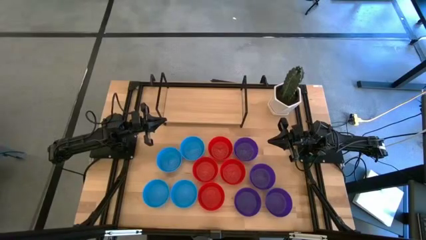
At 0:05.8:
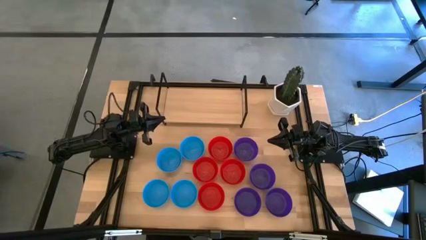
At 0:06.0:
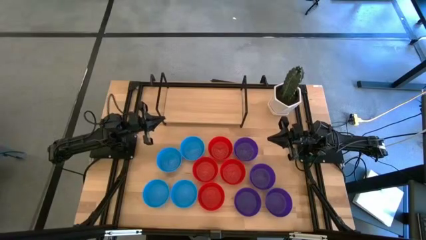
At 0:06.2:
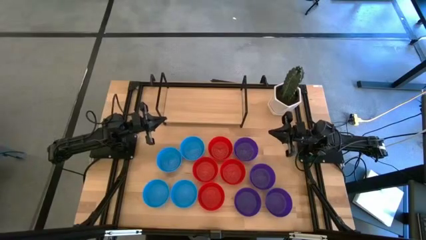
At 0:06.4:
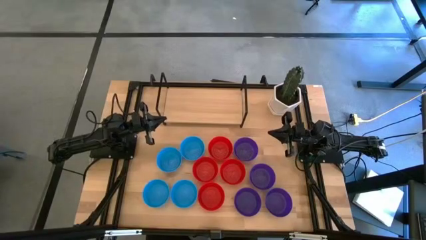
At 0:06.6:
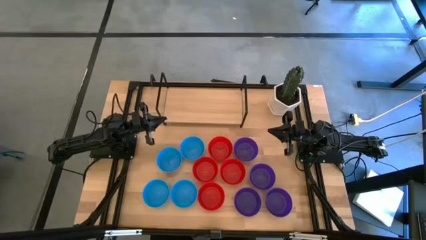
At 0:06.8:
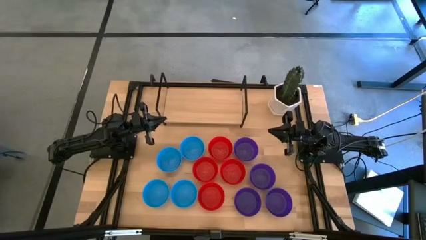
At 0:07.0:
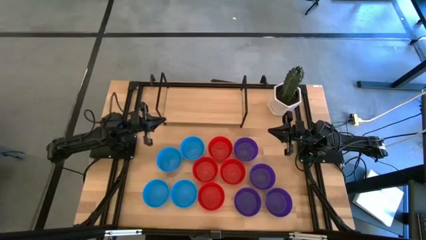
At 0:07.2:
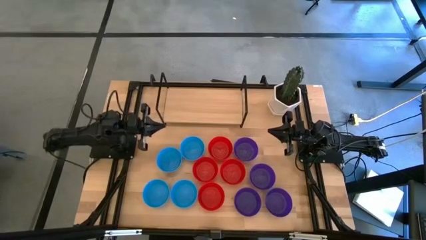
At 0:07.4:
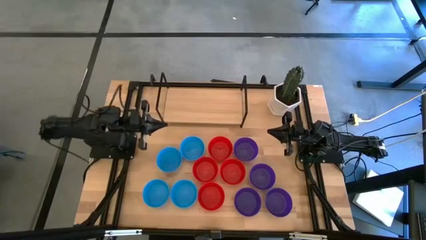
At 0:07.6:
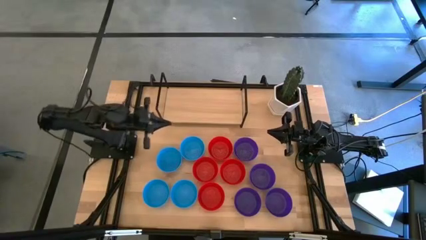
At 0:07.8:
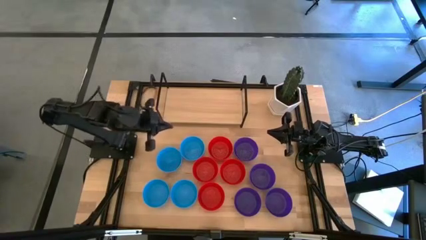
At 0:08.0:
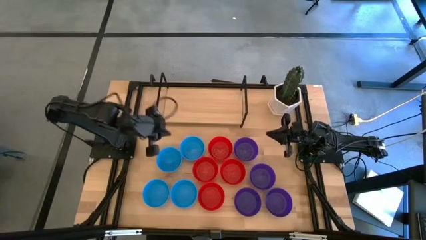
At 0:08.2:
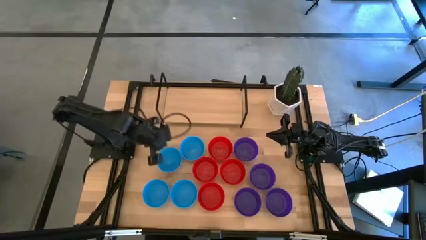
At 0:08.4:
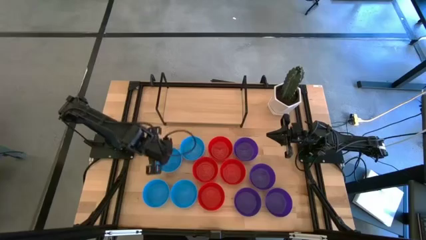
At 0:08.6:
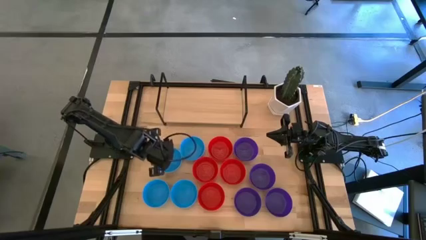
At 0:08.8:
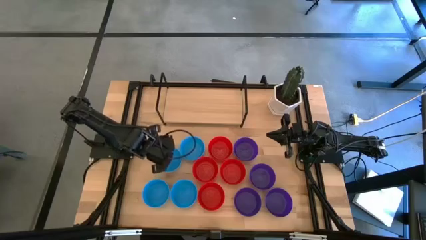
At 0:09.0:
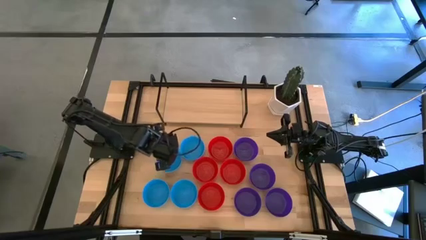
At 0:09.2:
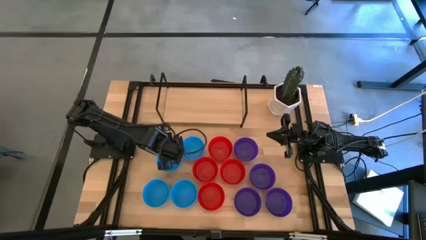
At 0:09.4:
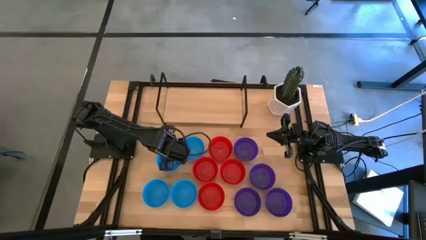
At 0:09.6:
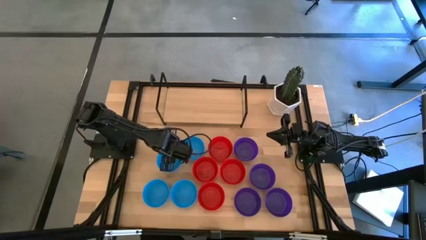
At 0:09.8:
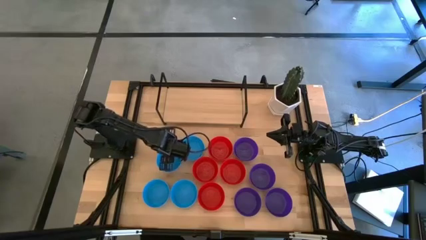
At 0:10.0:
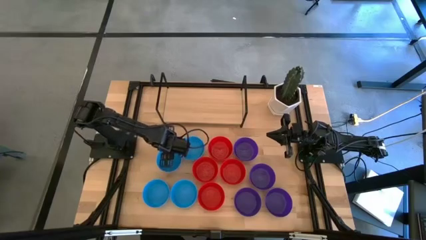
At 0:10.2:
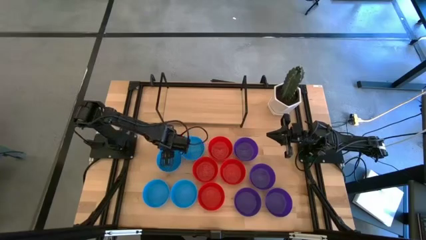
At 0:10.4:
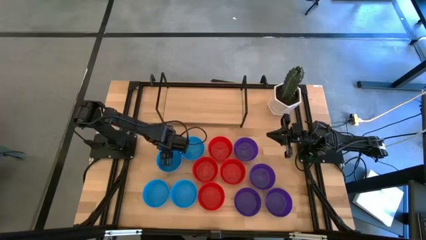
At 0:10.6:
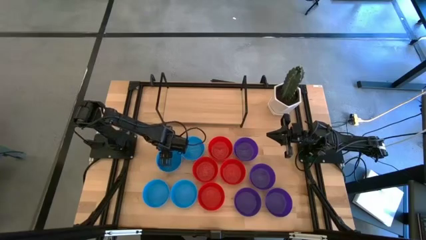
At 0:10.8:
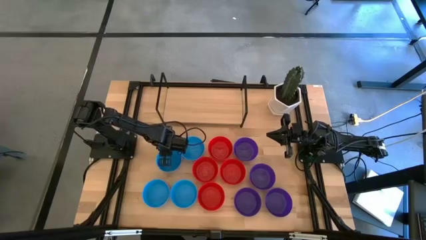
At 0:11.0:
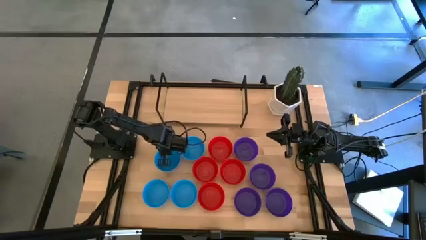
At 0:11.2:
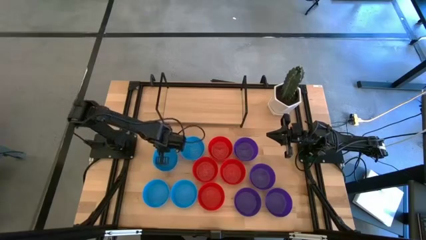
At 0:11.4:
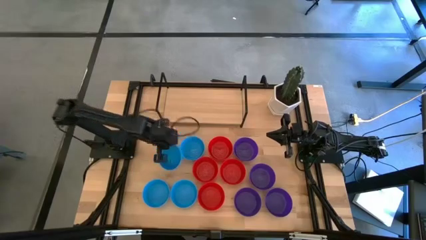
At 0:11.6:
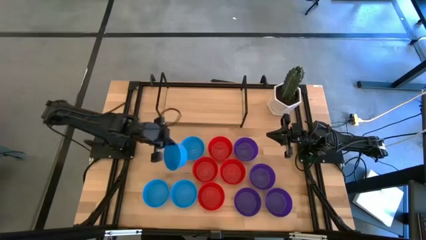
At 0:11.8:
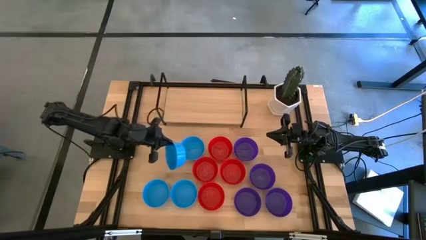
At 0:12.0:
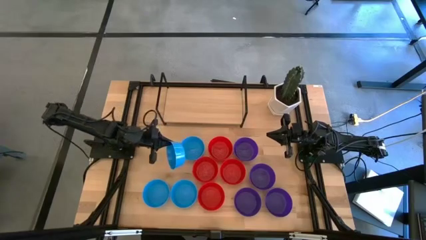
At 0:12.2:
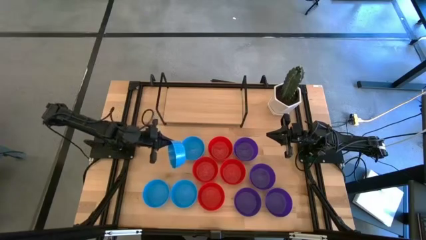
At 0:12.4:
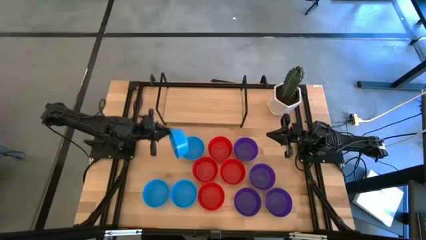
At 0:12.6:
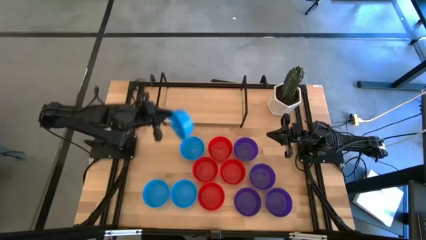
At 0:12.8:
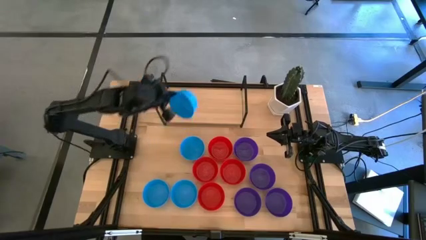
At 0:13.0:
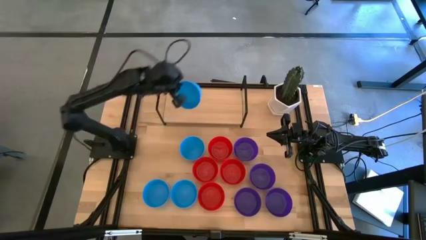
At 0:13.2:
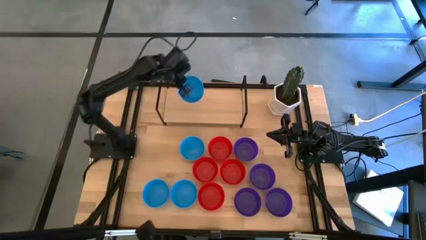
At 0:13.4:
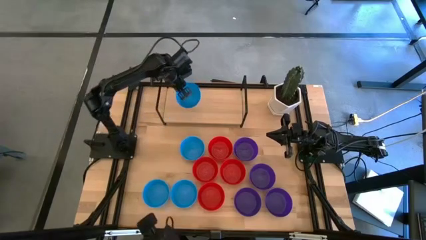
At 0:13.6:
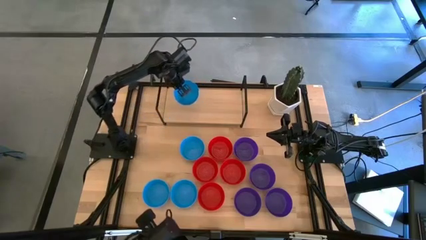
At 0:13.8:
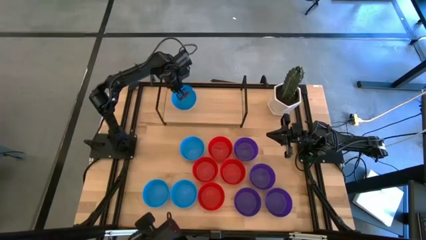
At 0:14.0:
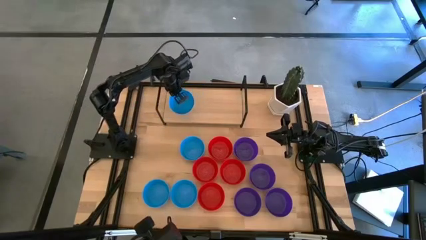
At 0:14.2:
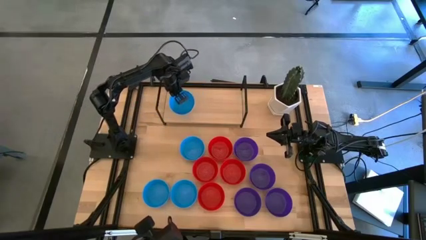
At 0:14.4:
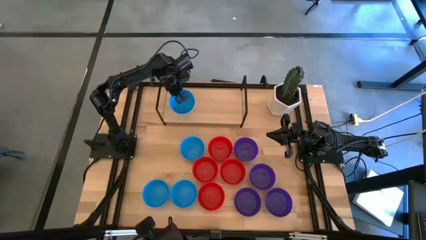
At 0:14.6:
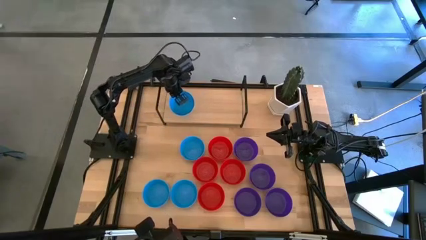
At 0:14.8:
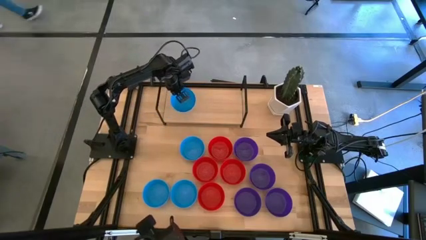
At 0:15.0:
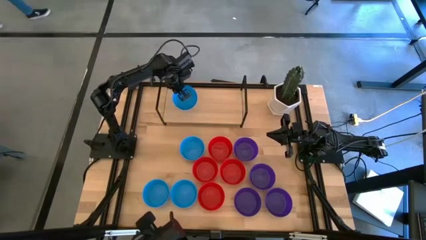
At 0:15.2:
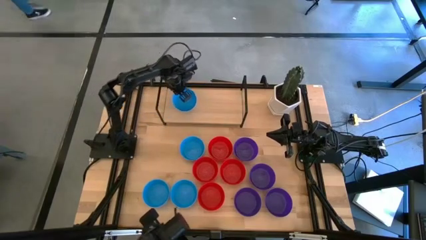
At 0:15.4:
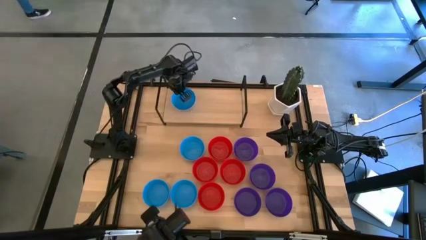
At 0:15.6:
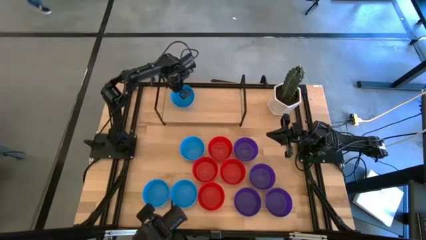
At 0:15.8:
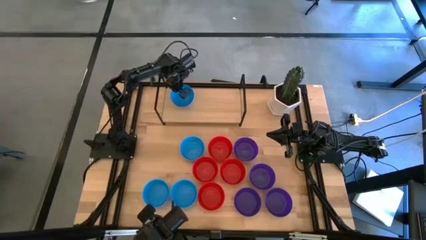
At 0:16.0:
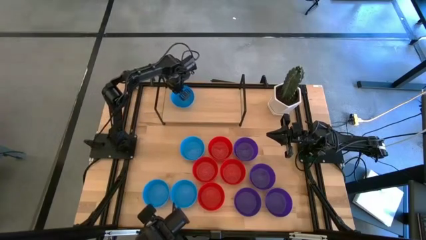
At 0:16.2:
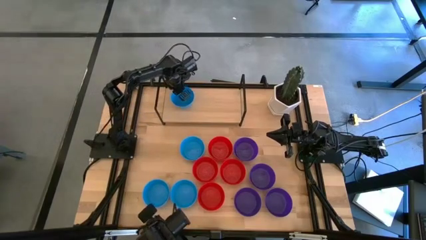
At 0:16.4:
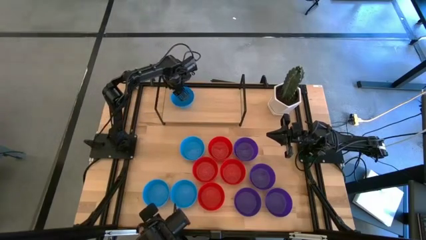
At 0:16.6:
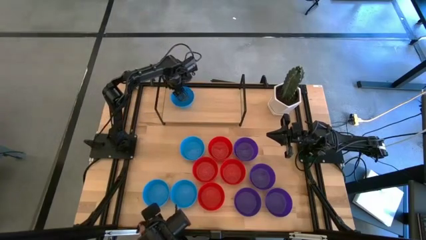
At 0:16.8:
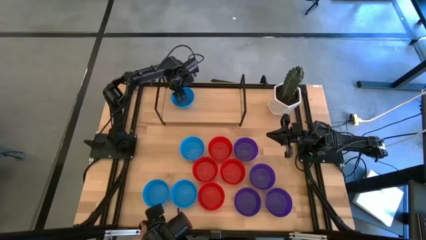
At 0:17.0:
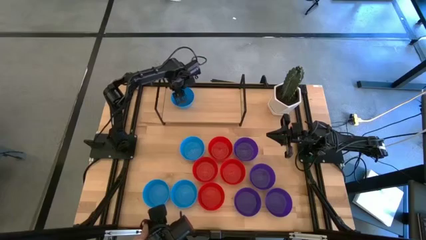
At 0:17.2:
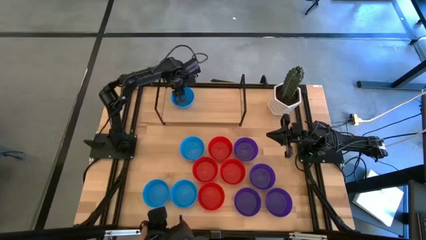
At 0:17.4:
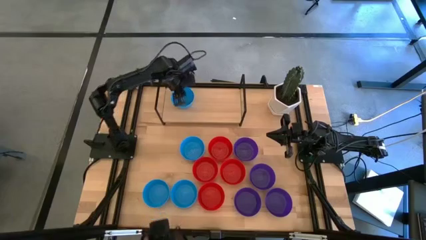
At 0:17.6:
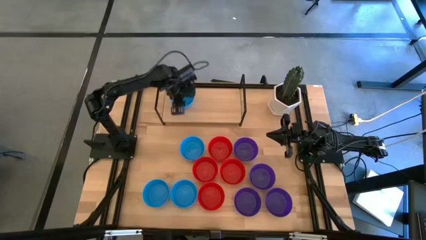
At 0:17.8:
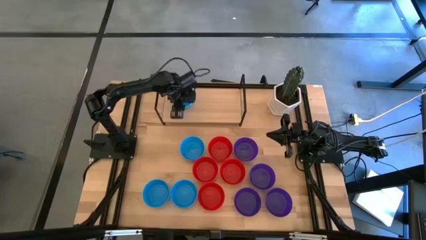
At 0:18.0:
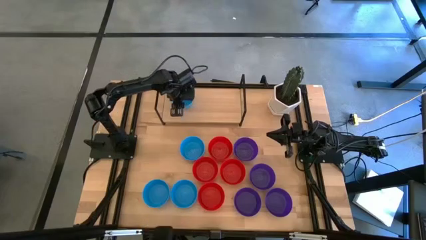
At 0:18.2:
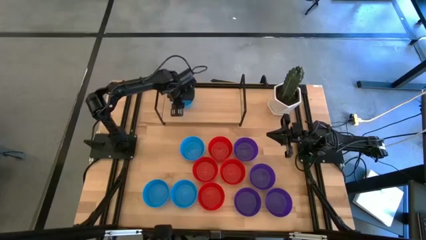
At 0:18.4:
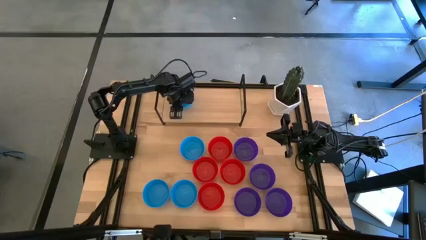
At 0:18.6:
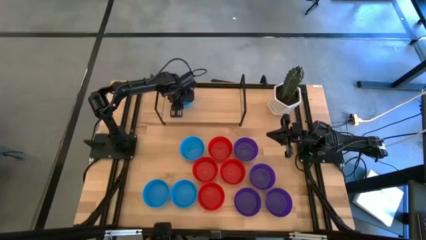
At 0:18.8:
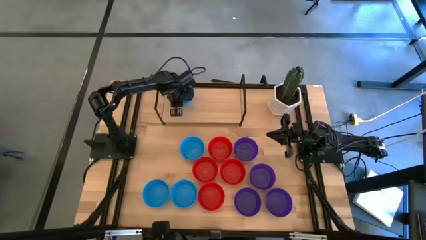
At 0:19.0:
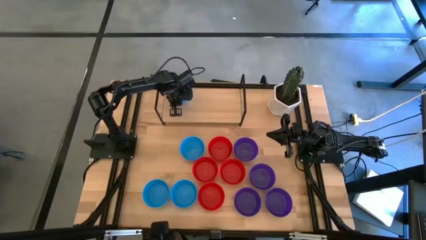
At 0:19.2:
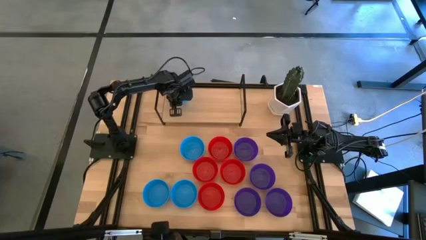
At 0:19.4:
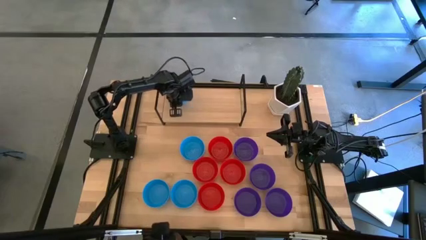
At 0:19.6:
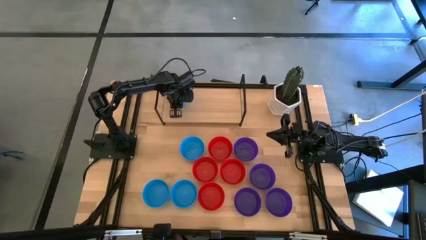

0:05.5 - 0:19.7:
Task: Pick & Place Mini bowls
Put the blue bowl on the shelf
